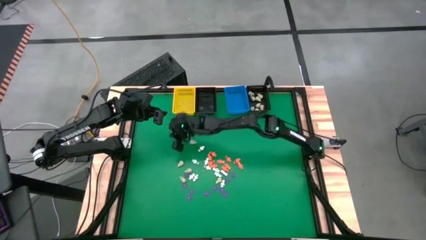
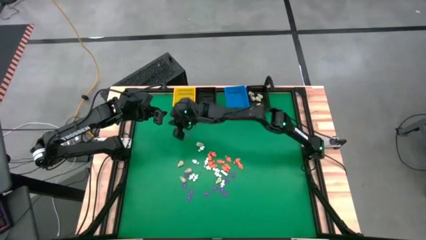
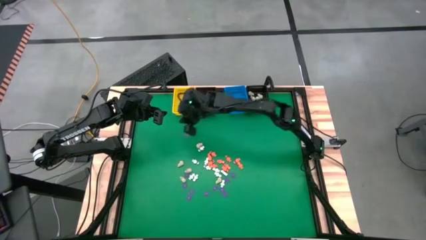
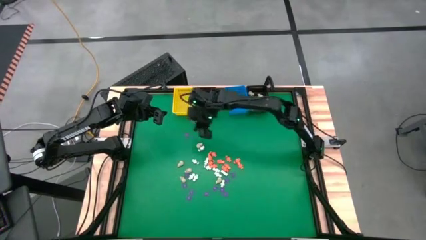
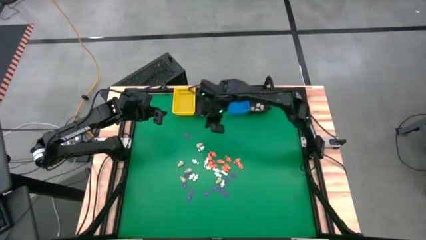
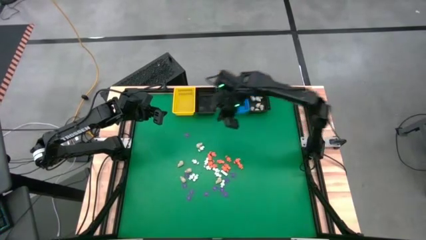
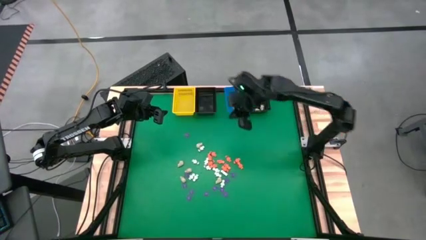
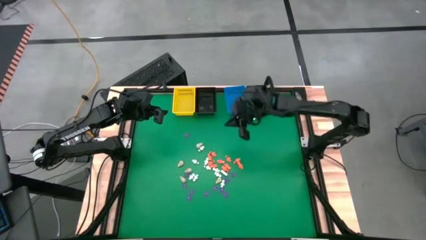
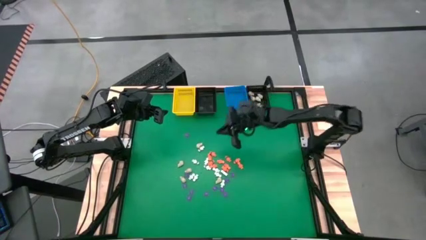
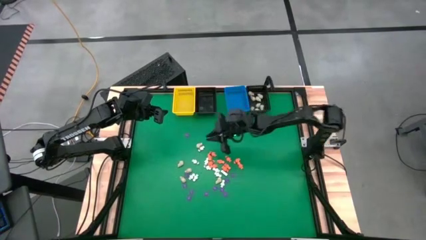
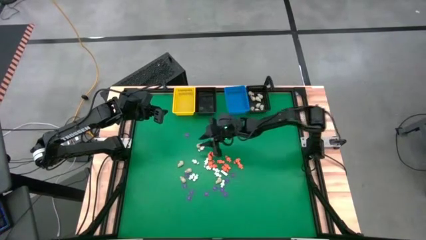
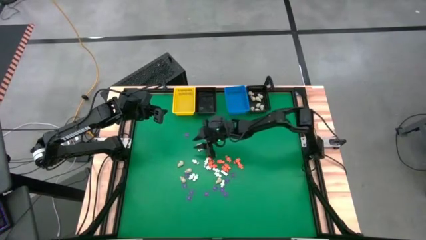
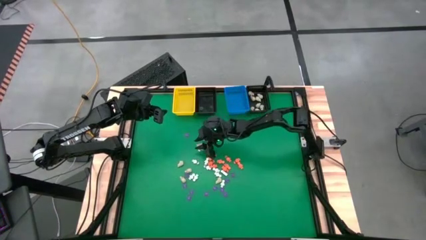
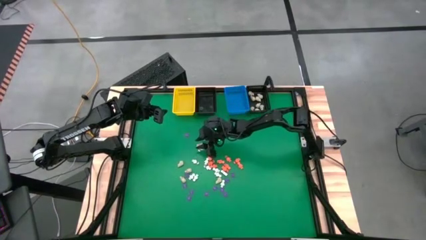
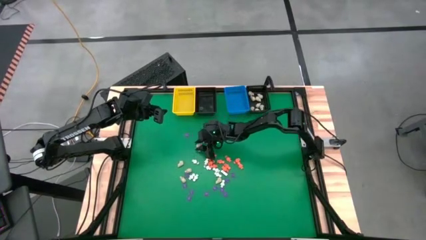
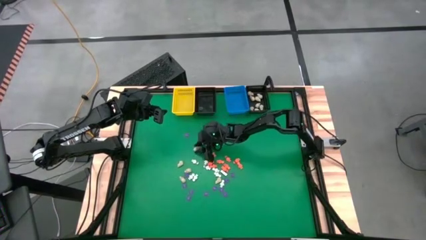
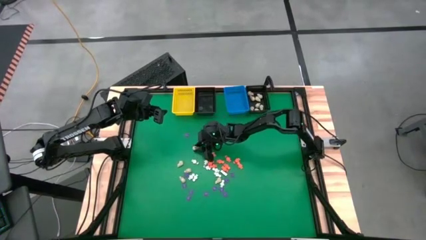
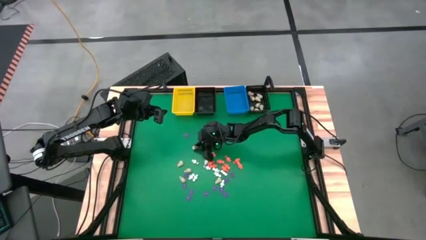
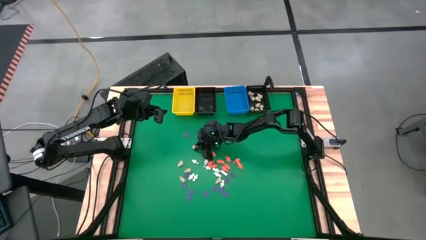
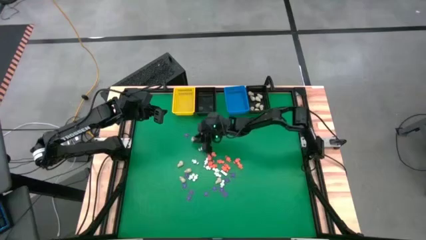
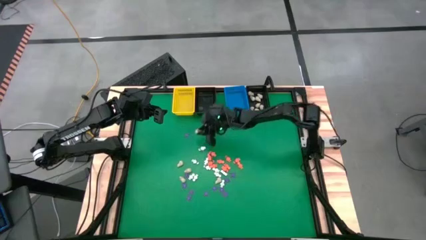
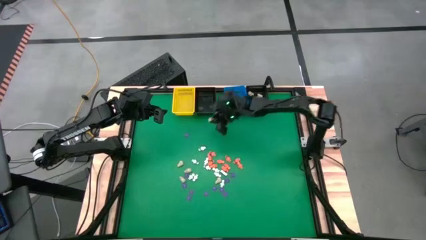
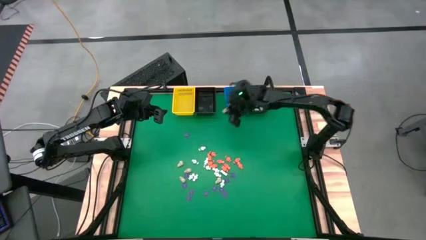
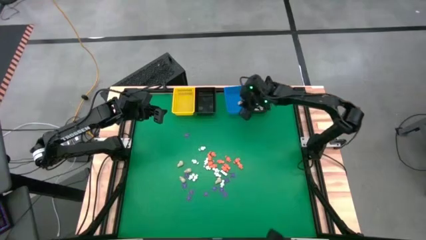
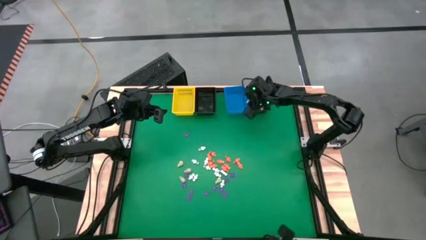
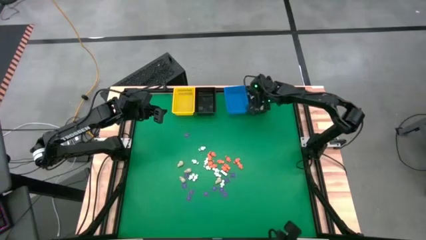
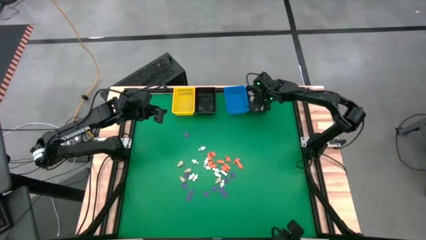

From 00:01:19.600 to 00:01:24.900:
Task: Sort Halloween decoration
Put the white skull toy into the right black basket

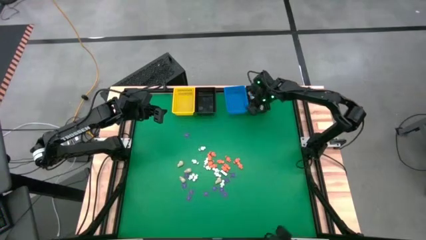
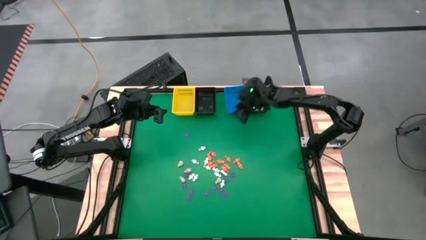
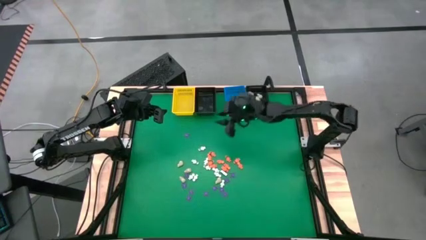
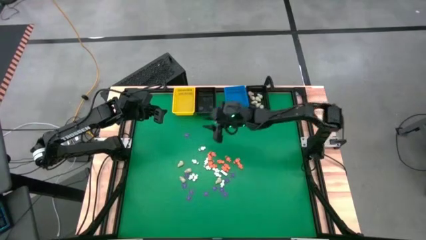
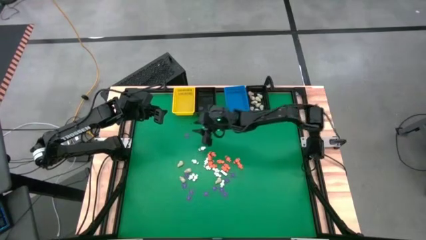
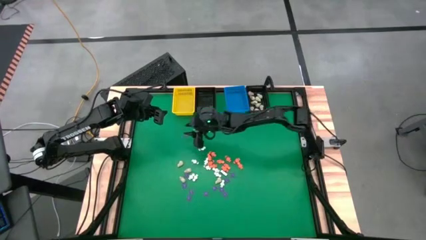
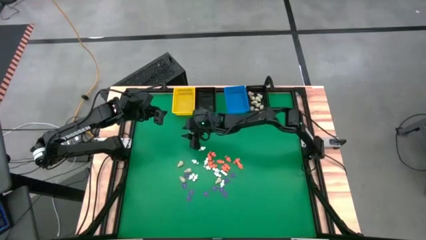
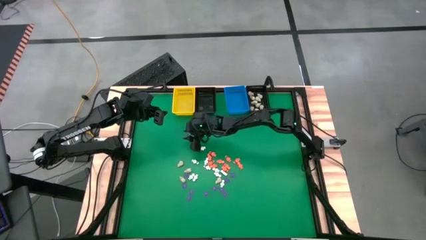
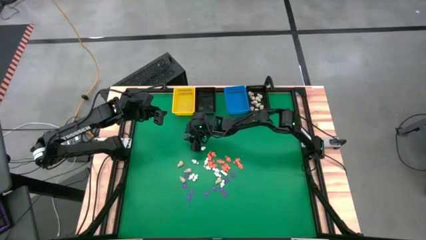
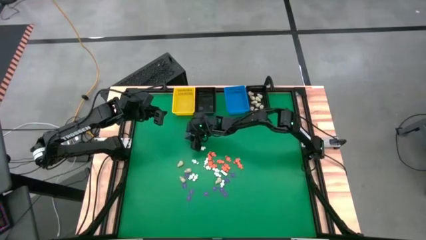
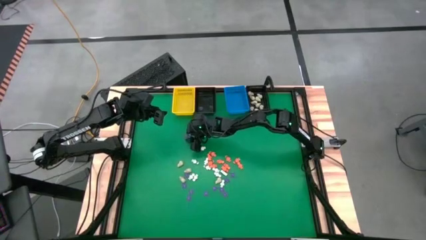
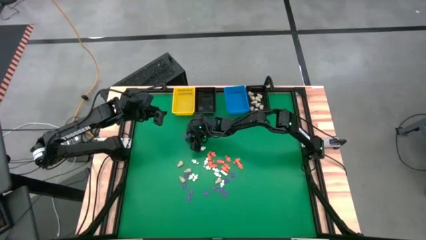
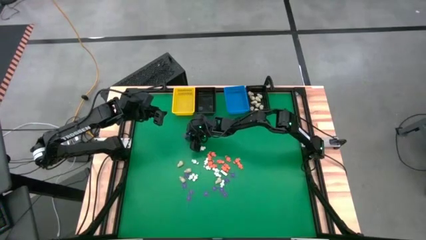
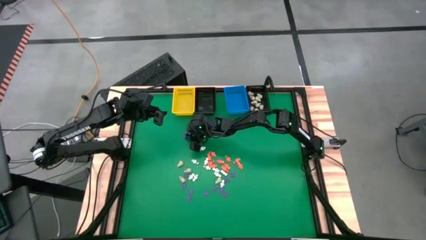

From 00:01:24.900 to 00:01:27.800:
Put the purple spider toy into the left black basket

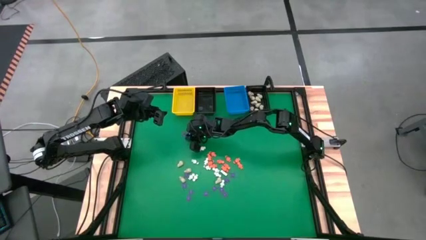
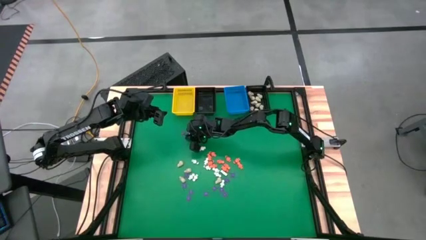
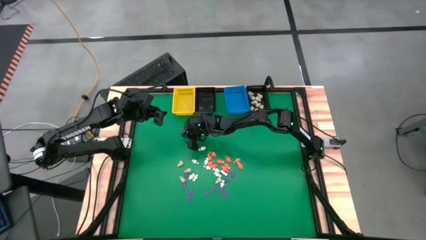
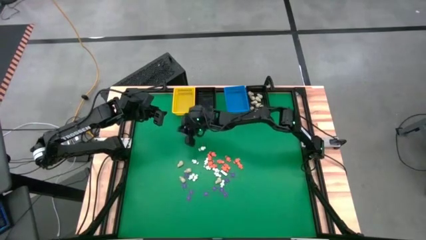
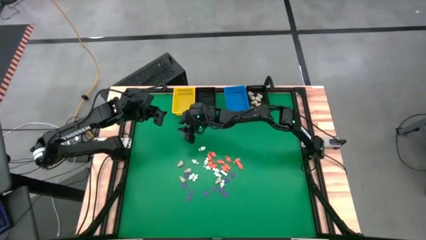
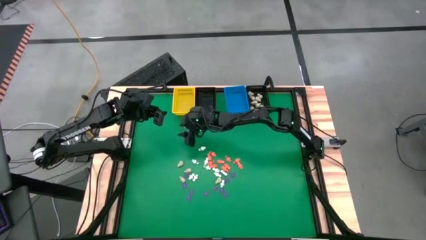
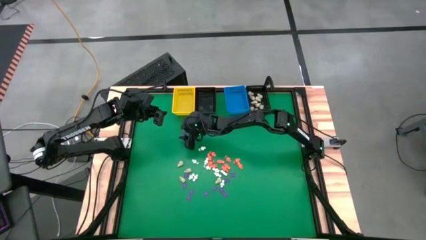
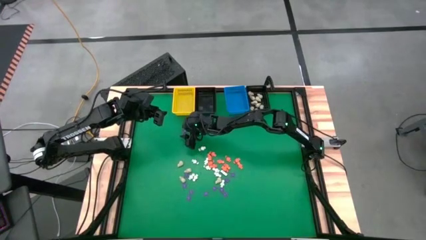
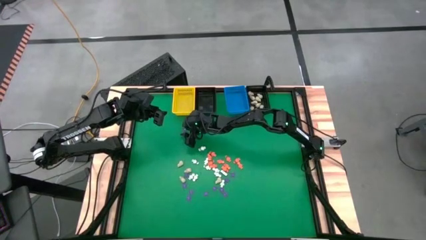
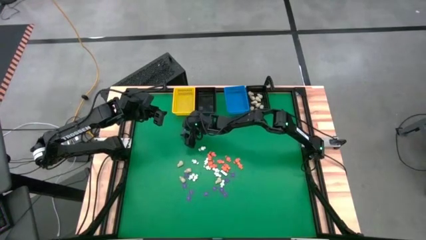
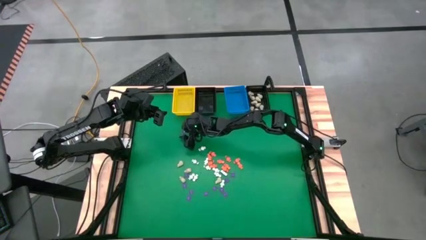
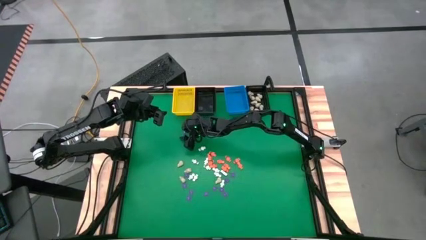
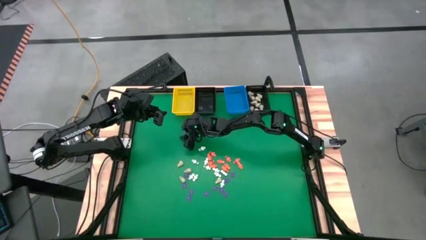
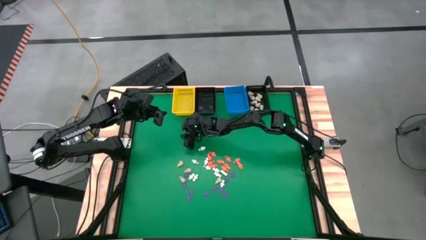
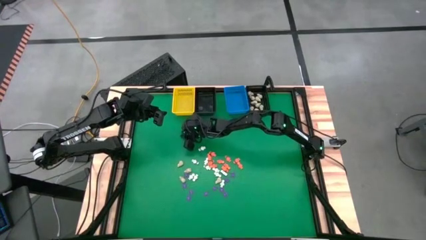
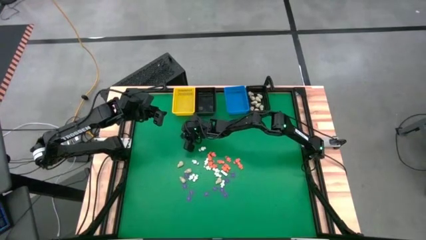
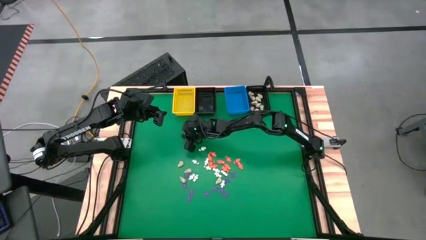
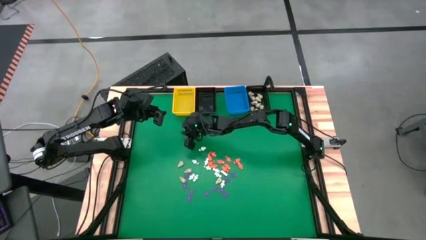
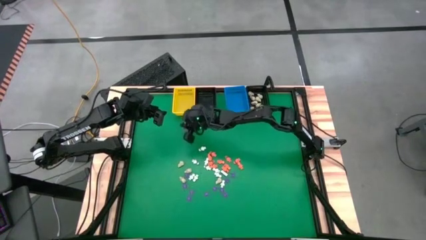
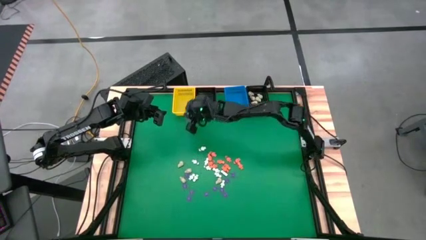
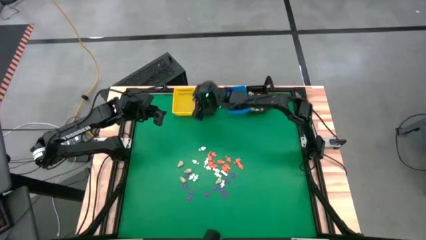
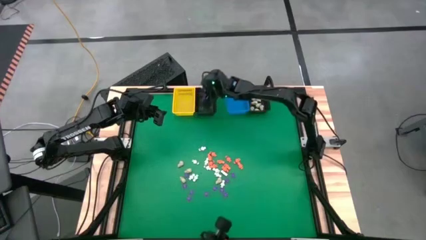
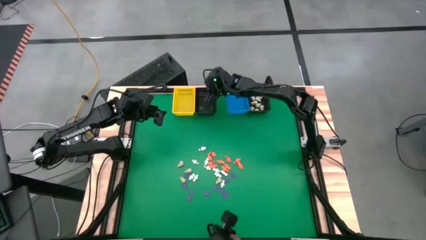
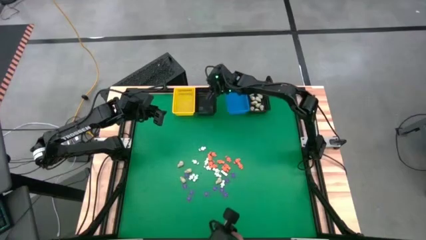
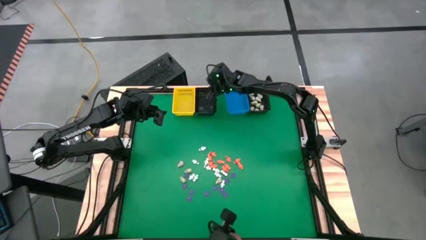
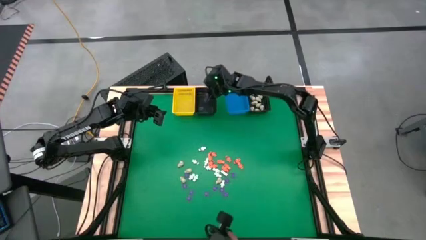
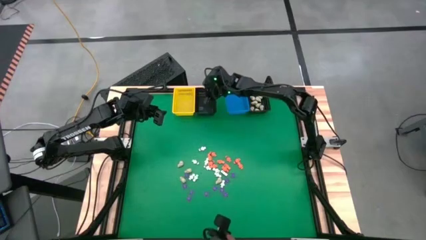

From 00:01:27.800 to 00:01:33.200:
Put the purple spider toy into the left black basket

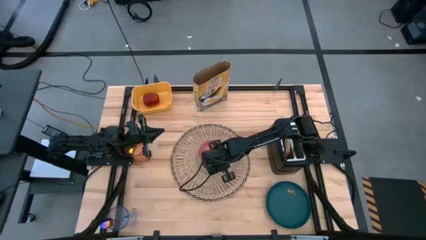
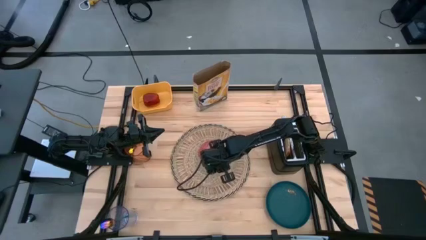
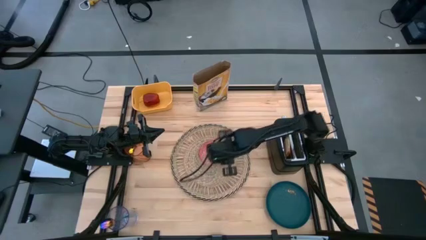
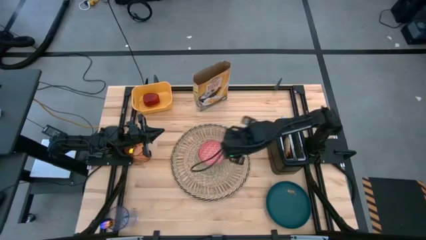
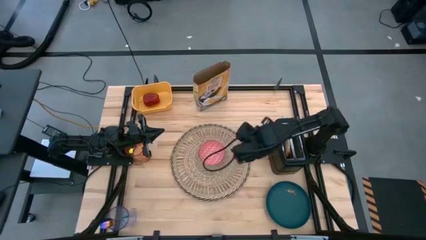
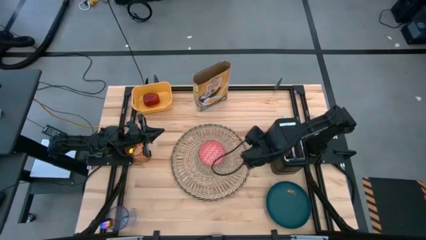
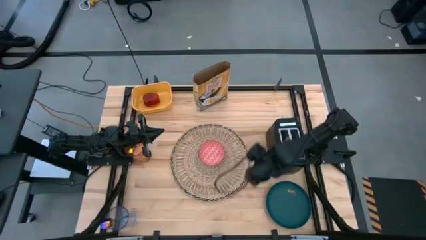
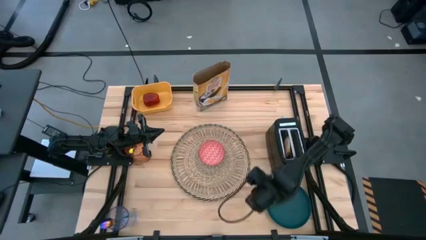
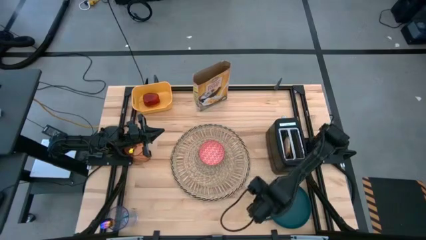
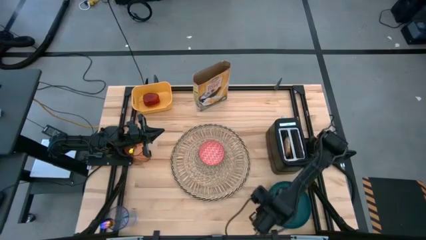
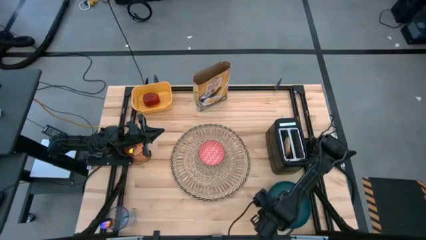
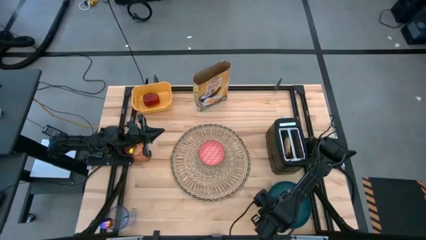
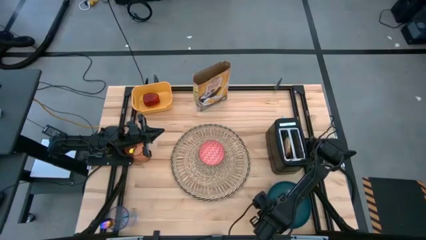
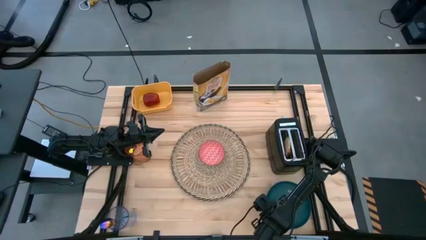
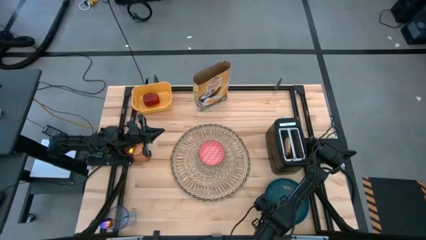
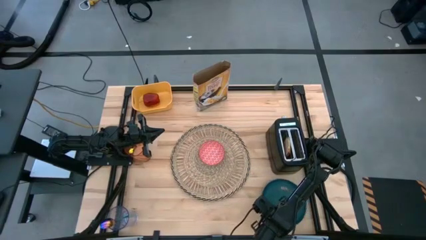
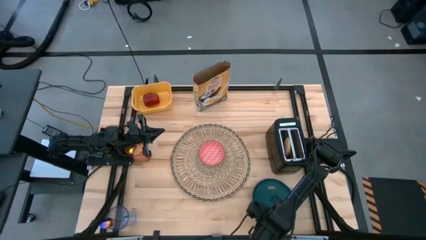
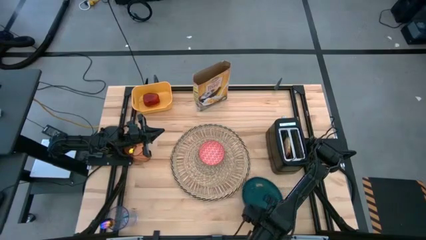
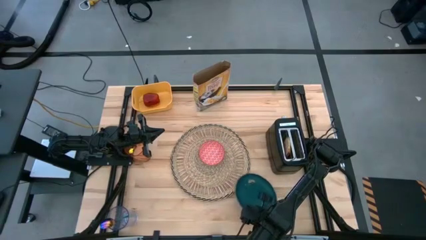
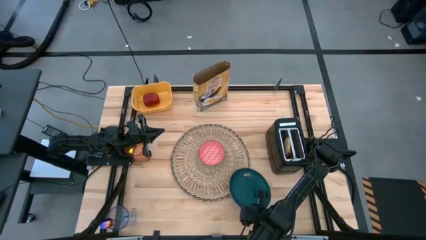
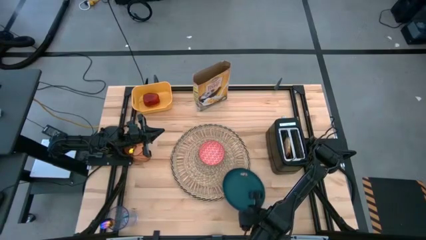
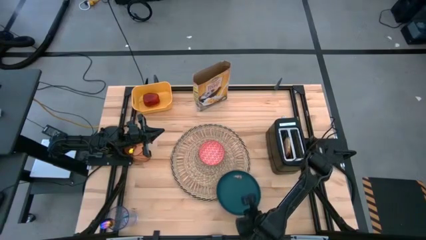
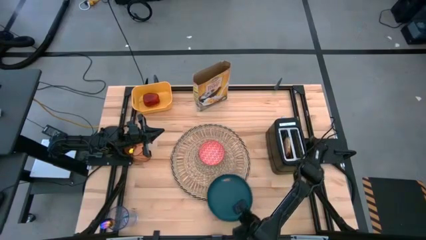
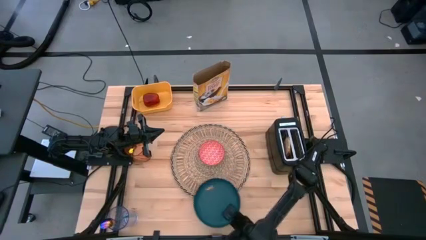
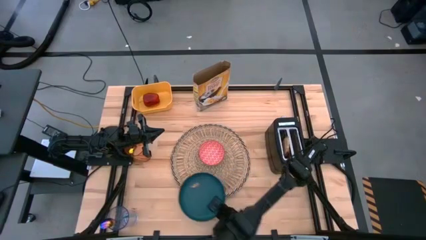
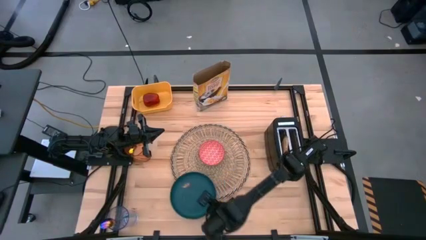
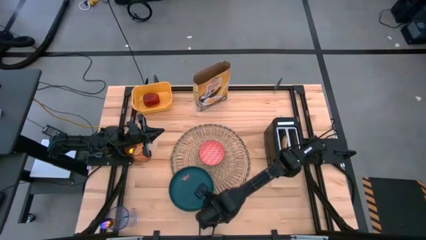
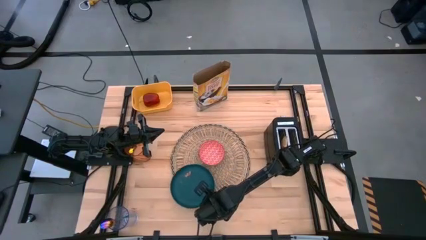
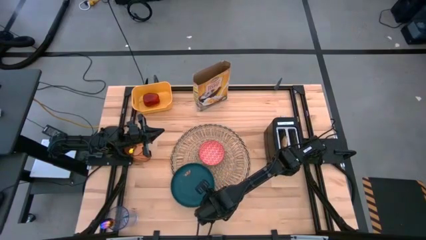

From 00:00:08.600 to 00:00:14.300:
Task: Arrange a breakfast setting
Put the blue plate on the placemat to the bottom left of the red bowl
